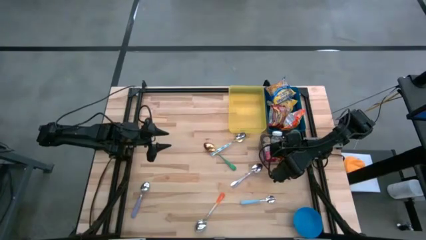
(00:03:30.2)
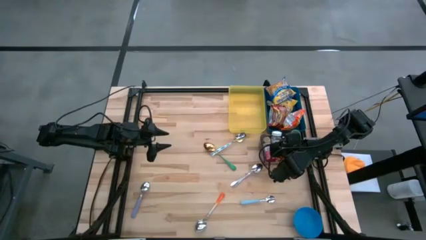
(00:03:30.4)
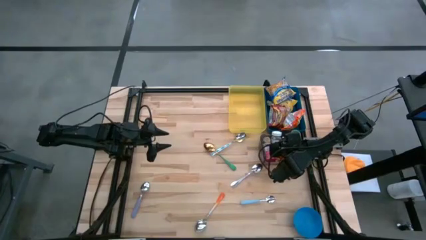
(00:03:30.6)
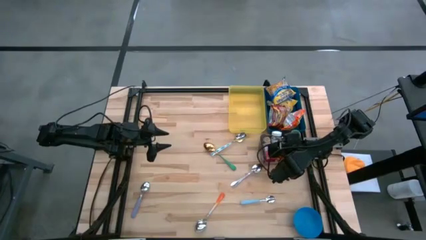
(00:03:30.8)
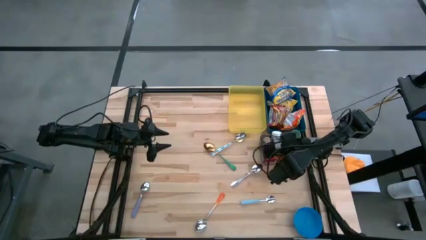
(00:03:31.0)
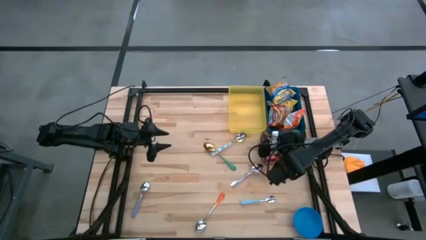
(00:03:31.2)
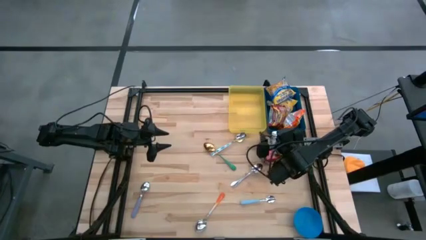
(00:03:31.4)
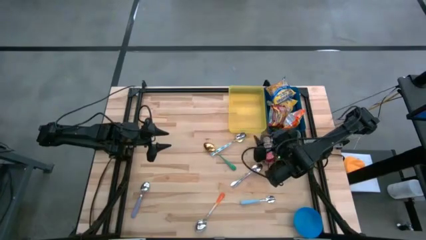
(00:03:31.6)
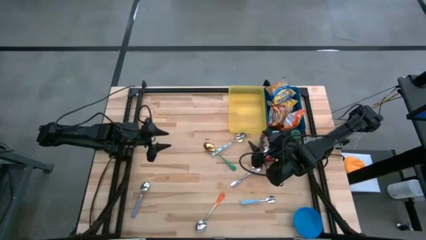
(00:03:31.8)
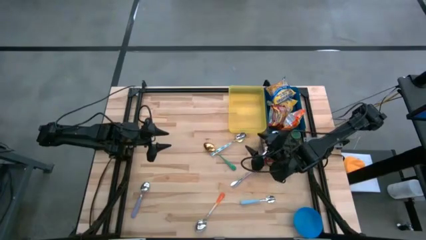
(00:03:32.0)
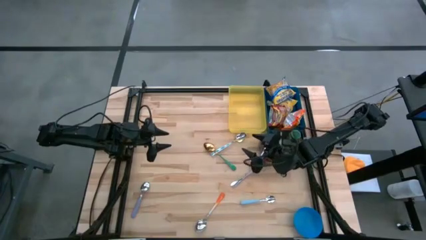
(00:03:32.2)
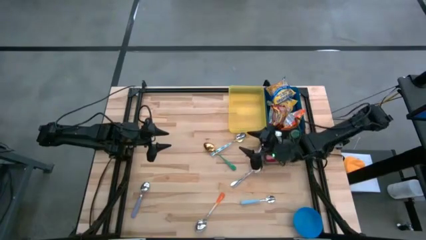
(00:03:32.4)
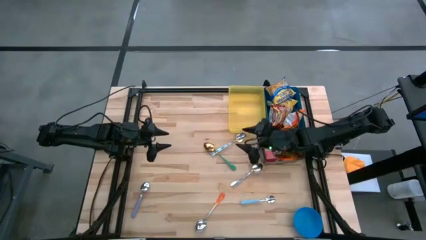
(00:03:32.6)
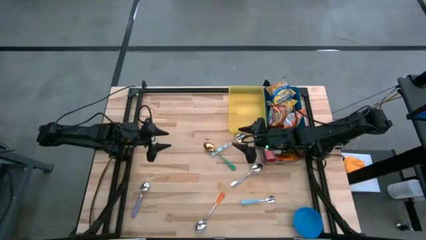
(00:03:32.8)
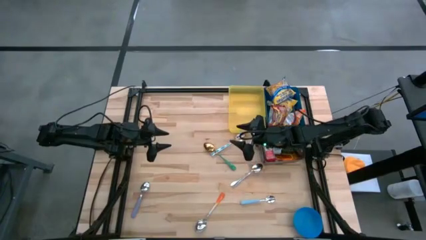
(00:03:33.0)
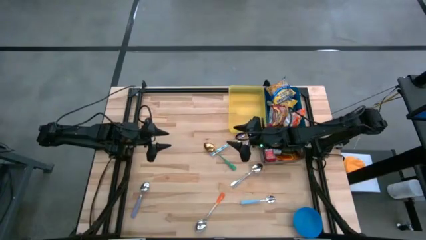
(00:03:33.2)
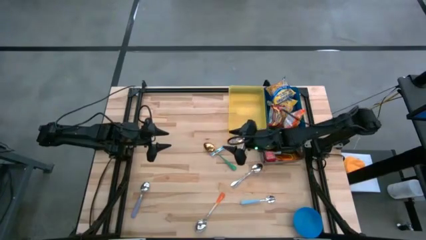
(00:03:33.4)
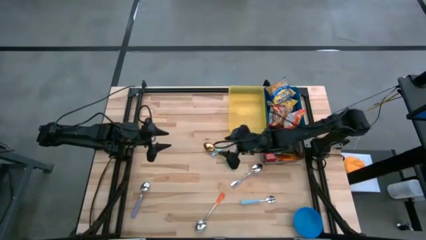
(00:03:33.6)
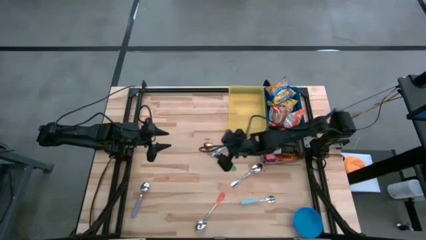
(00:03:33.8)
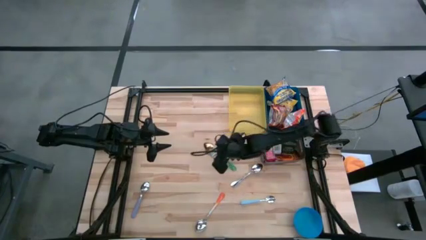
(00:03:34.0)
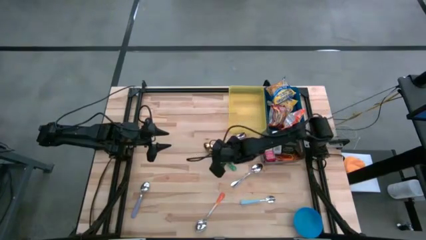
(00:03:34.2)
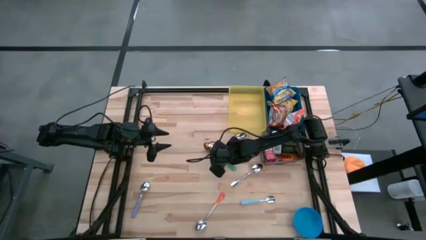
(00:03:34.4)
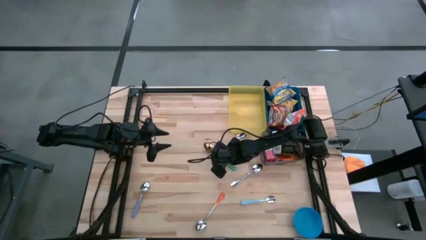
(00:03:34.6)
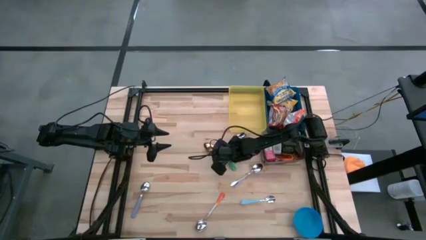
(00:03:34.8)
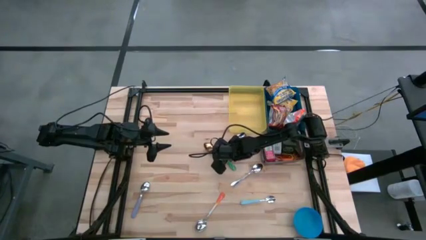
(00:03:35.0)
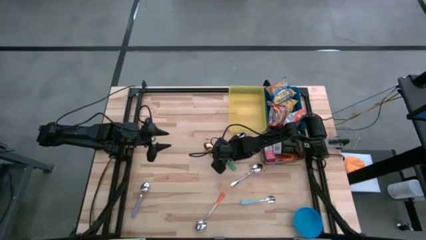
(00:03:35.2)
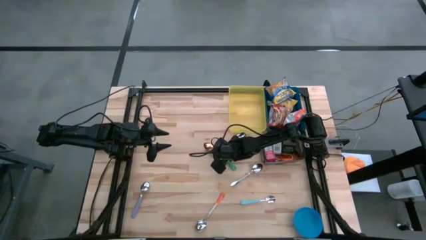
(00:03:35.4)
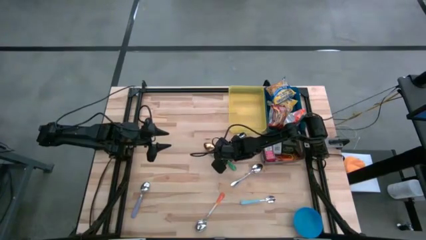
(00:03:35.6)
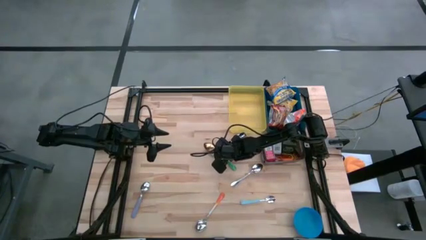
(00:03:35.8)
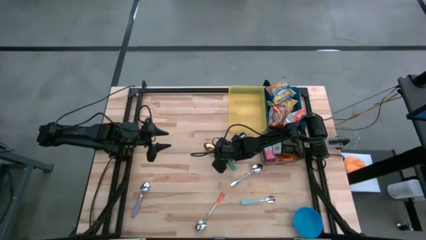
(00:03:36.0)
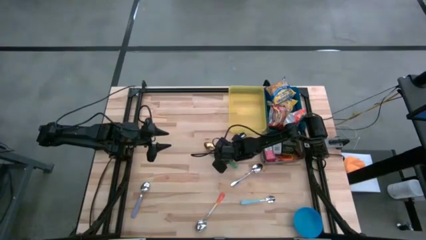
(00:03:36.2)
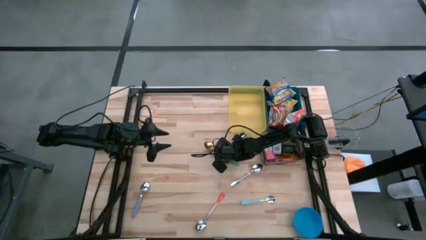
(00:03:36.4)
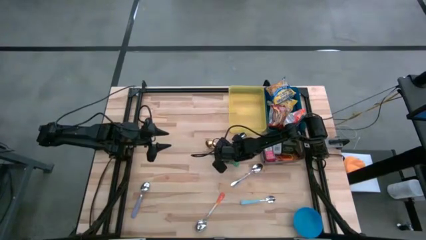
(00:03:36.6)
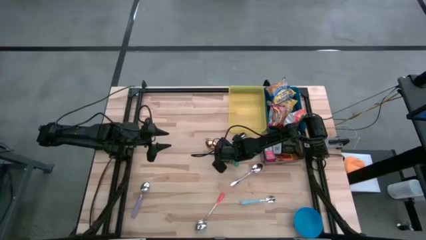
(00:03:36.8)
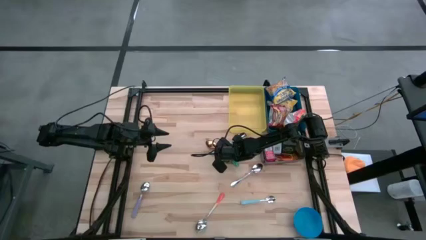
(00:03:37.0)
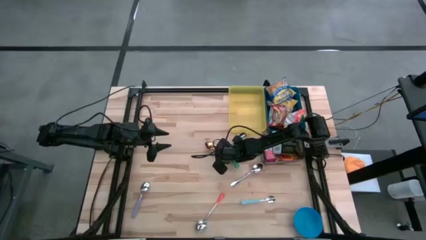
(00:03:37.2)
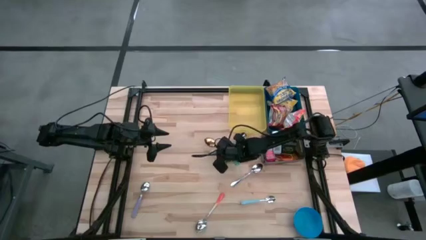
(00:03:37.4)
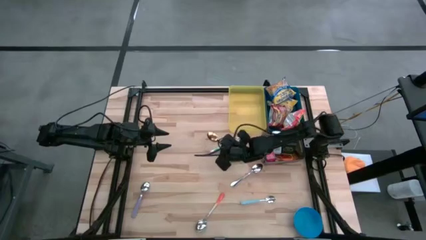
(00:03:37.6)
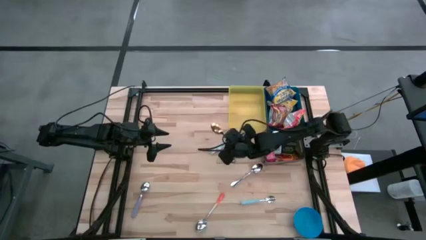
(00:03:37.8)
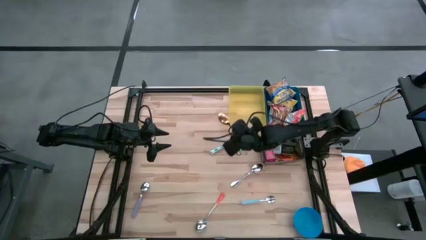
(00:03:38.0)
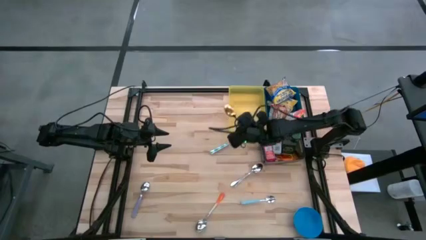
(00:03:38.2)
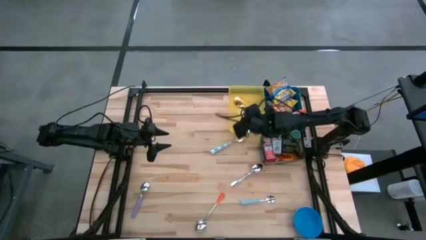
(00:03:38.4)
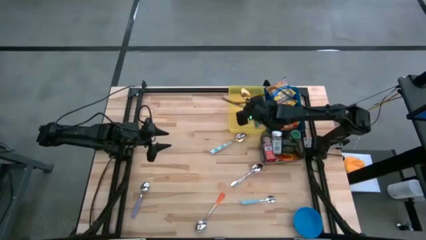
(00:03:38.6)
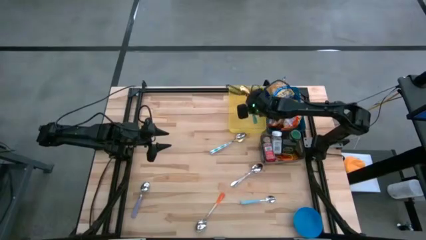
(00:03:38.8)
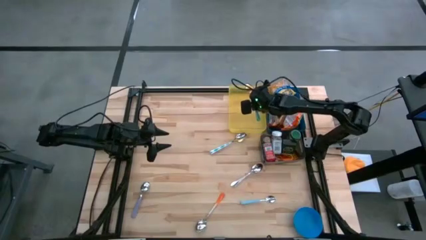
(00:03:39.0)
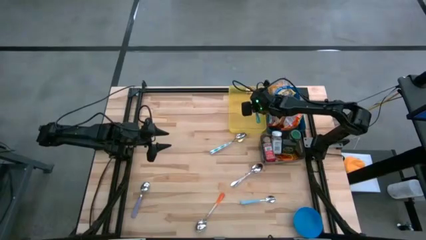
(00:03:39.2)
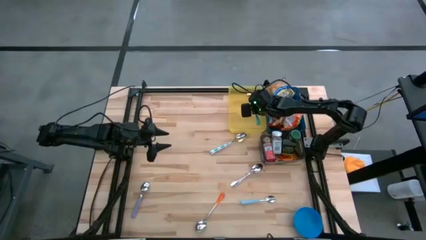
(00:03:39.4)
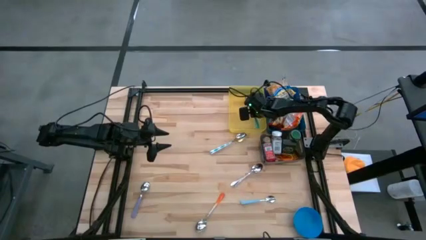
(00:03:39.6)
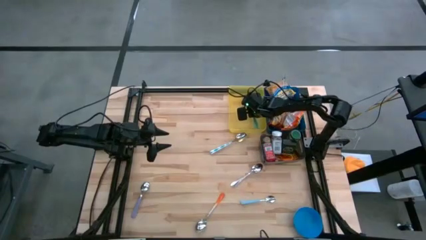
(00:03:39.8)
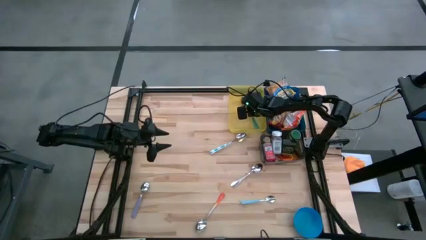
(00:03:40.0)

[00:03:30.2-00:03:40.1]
Put the green spoon into the yellow bin

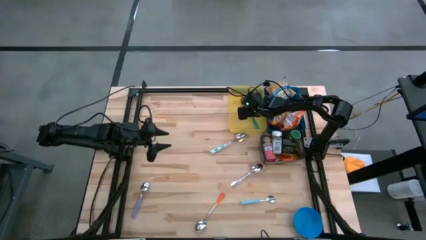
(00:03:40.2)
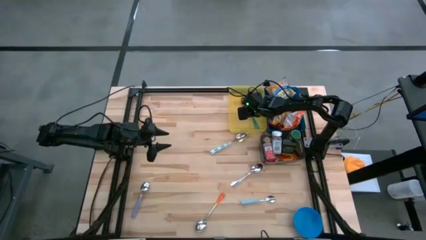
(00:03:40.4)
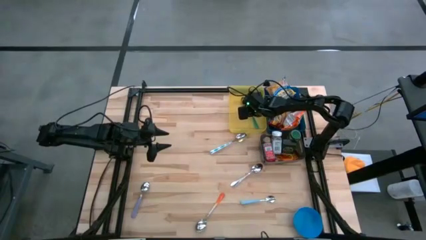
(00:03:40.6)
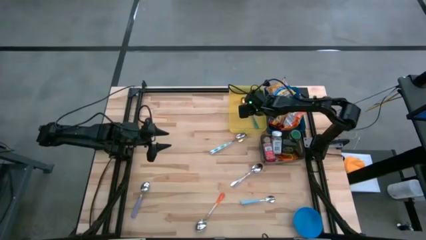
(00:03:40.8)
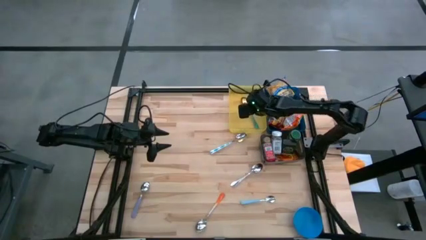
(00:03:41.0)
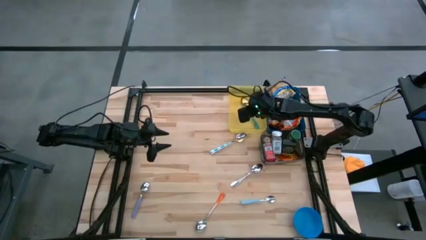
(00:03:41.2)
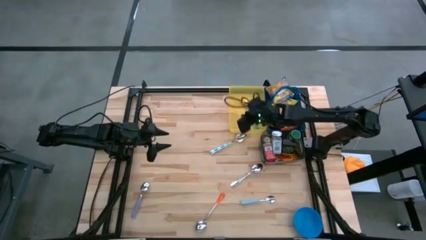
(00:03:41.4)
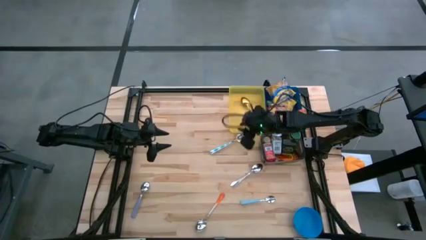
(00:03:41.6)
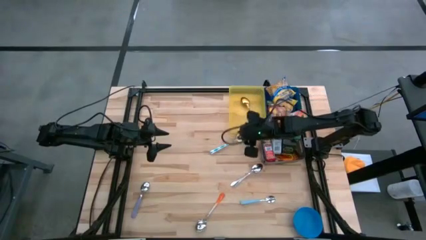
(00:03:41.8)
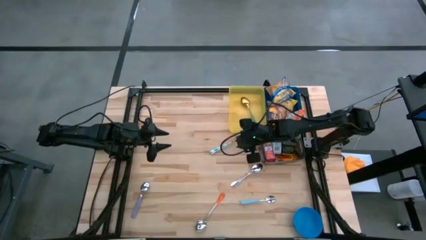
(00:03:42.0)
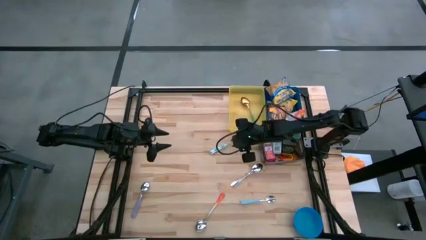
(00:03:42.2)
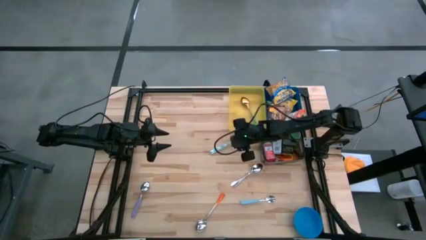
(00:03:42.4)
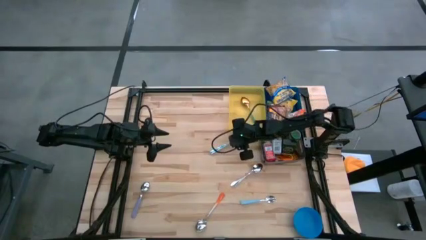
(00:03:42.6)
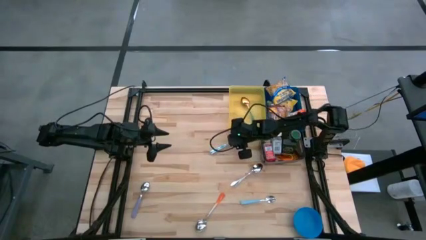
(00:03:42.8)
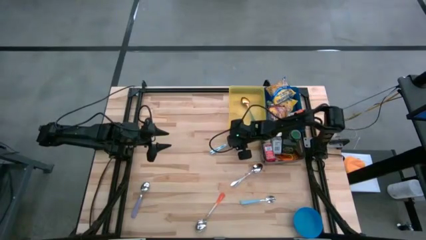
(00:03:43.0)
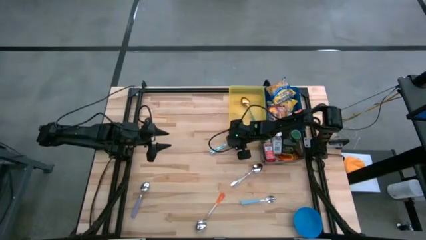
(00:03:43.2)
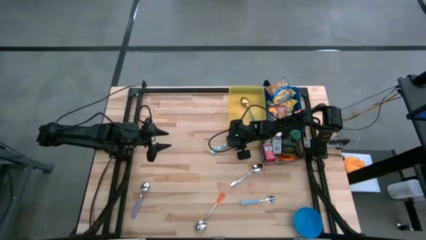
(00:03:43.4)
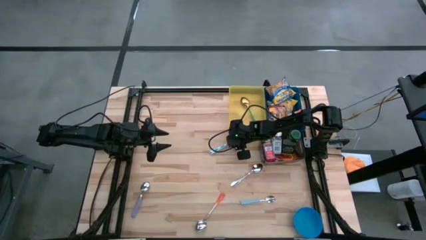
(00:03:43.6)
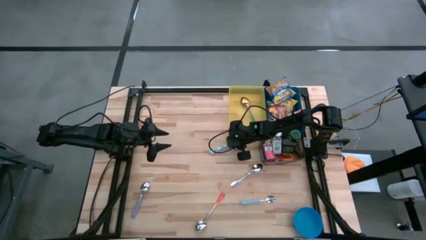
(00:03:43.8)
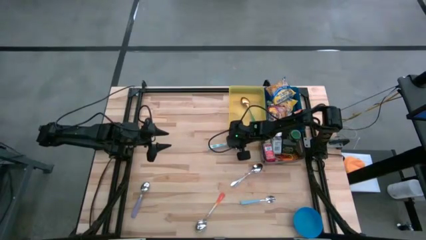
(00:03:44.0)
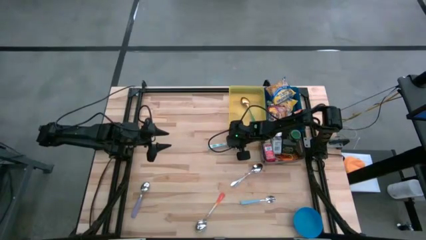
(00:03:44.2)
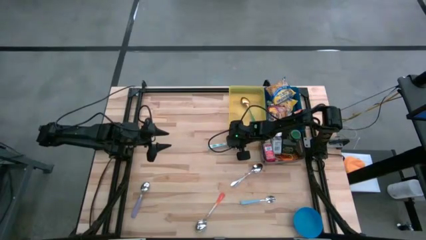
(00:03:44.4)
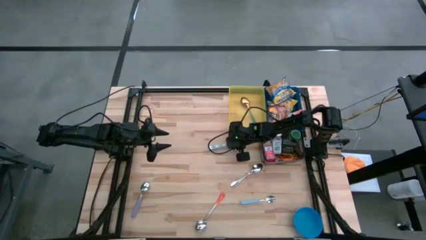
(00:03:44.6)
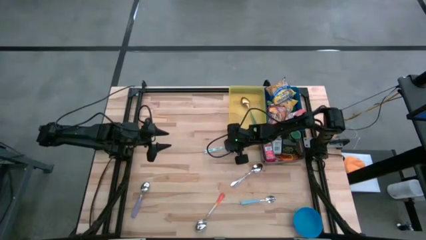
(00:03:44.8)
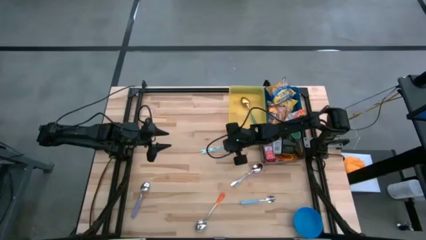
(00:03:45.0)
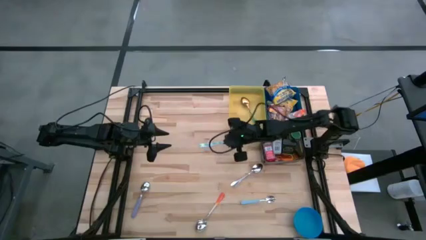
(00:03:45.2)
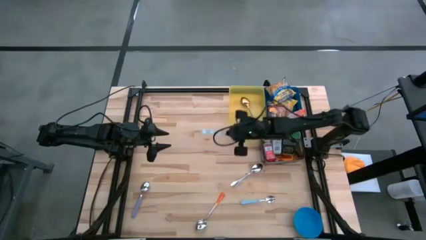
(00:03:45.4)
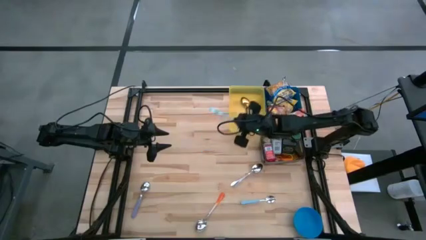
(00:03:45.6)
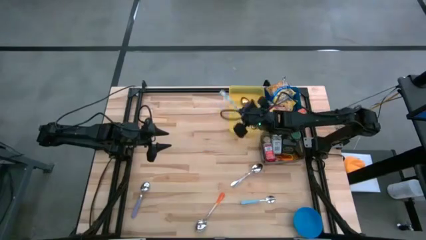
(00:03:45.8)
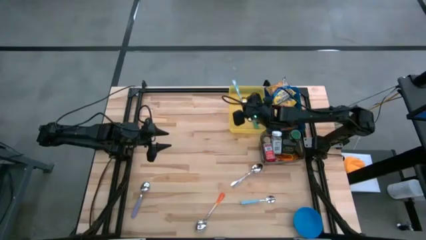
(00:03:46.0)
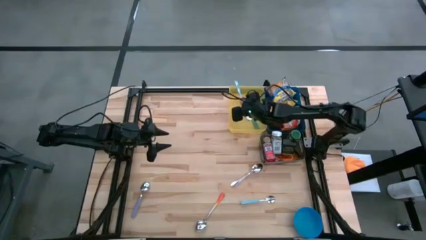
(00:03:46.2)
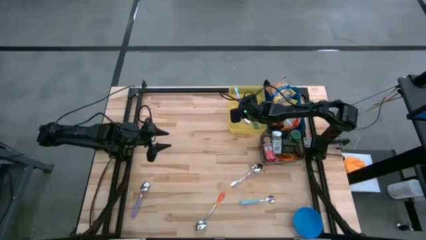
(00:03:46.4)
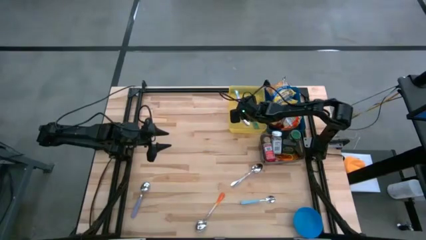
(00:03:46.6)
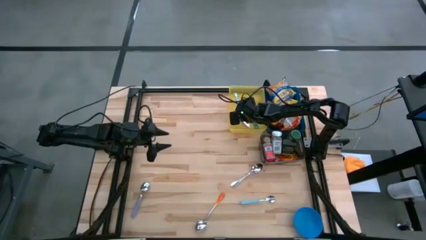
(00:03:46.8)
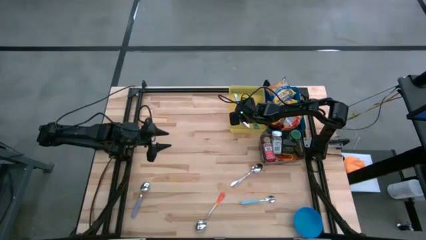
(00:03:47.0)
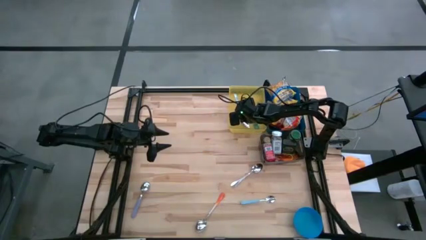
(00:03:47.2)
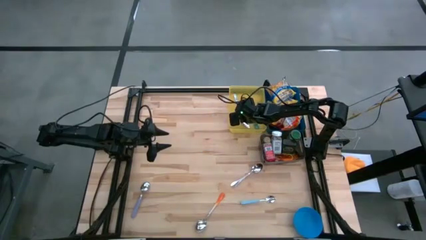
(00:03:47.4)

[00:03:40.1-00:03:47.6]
Put the blue patterned spoon into the yellow bin
